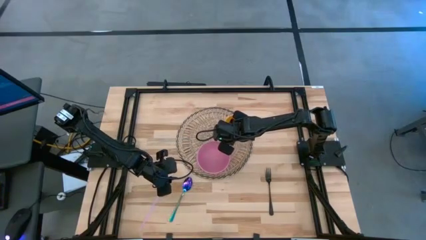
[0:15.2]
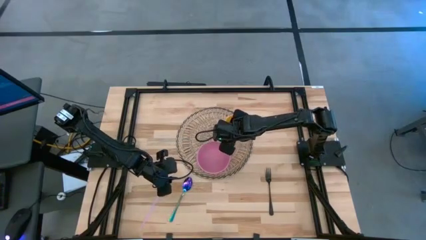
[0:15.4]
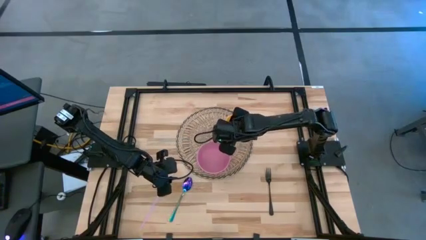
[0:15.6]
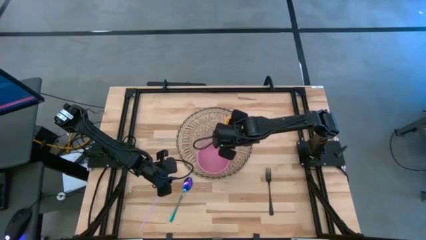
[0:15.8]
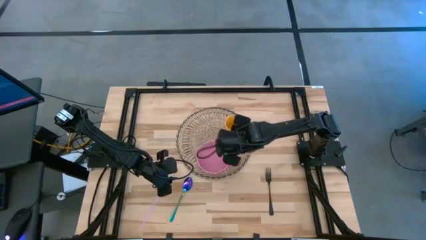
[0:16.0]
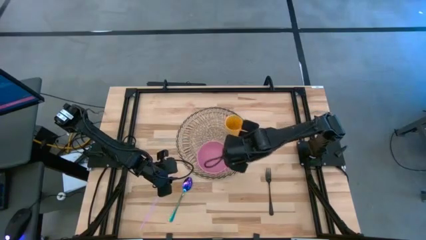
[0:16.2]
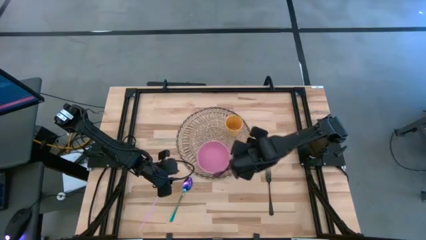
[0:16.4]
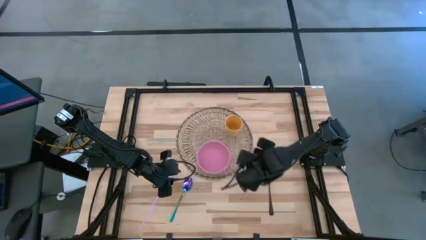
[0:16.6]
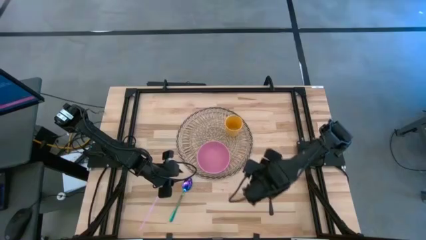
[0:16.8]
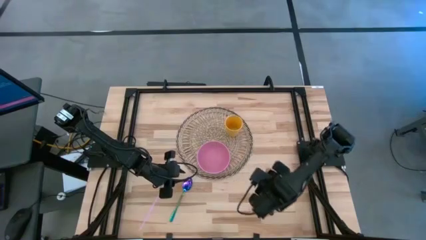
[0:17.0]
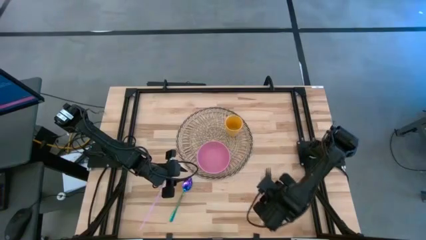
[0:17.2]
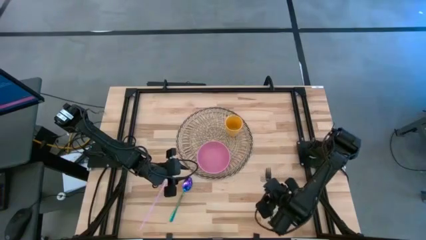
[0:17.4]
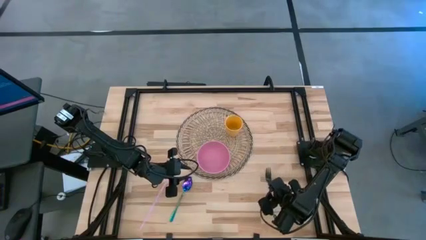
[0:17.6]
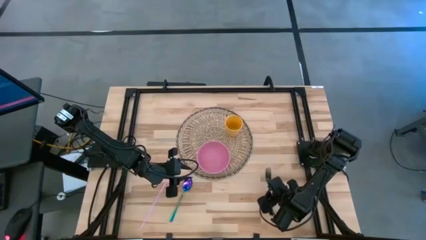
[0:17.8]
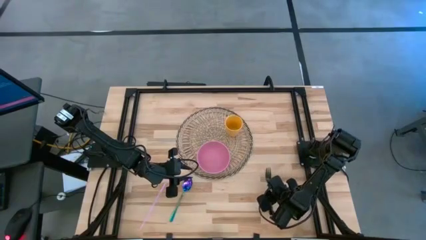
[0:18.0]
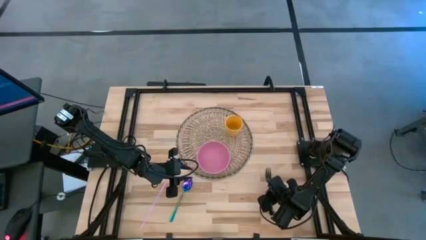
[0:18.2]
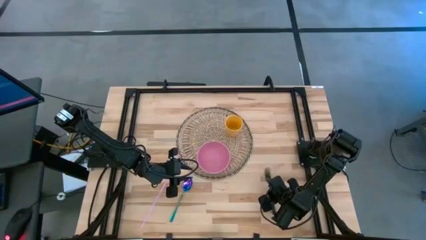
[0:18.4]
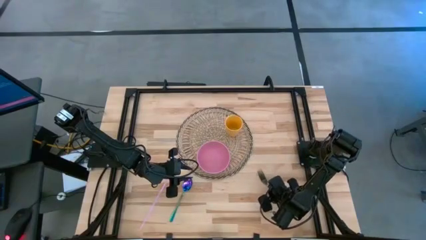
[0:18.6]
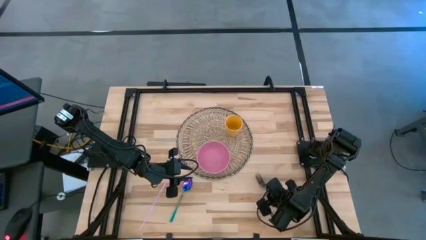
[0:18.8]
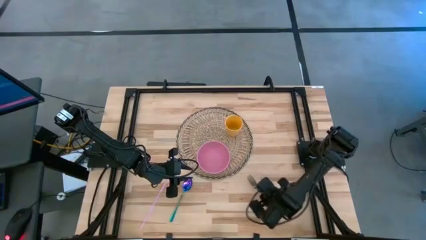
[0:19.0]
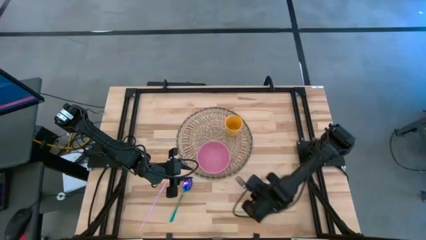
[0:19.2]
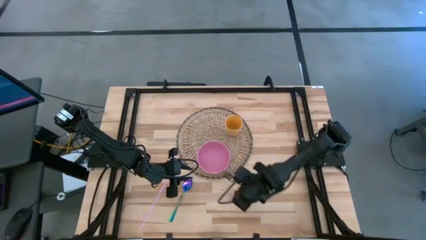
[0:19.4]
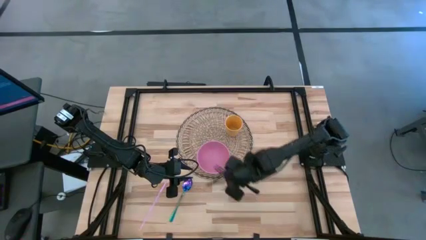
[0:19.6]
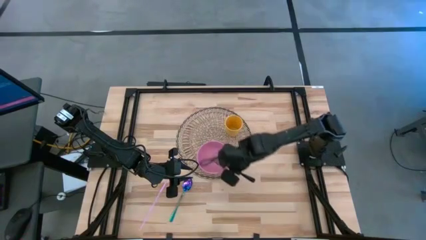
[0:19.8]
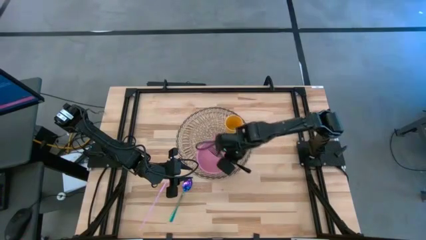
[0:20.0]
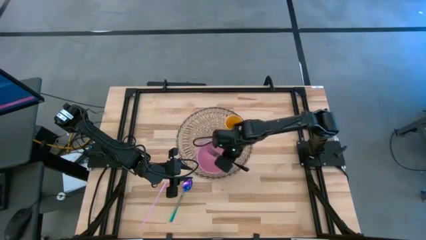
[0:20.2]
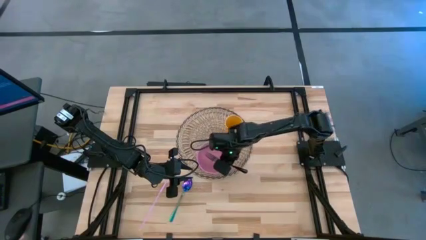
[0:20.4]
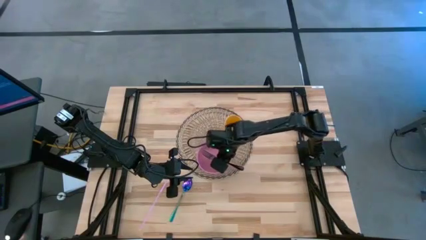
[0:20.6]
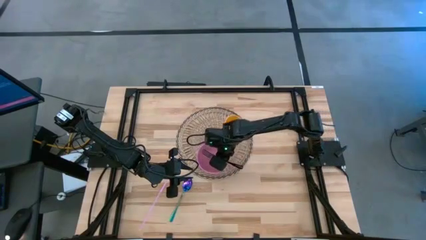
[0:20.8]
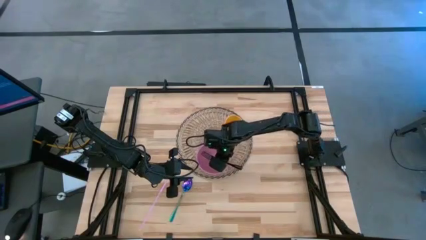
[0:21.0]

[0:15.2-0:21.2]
Task: Pick & Place Utensil
Put the fork in the pink bowl

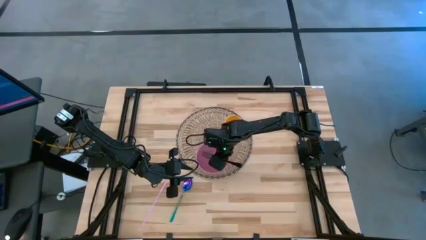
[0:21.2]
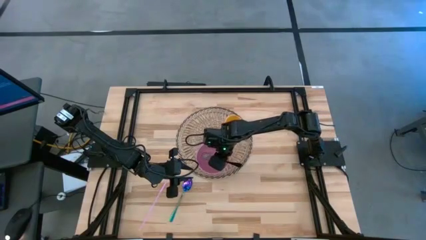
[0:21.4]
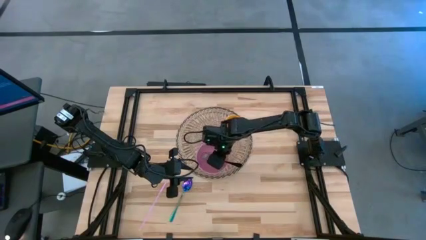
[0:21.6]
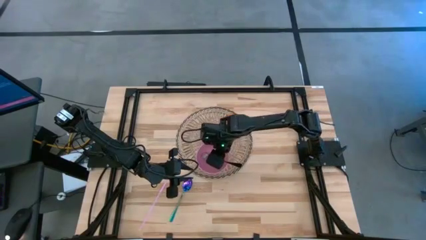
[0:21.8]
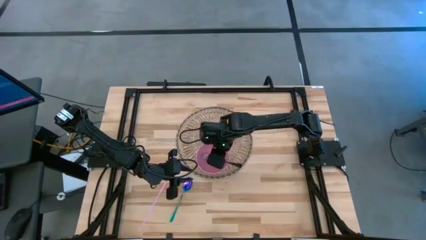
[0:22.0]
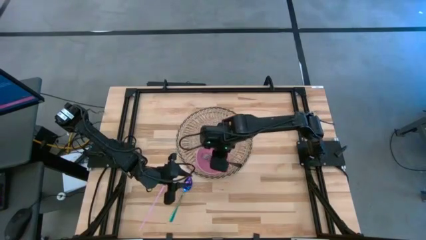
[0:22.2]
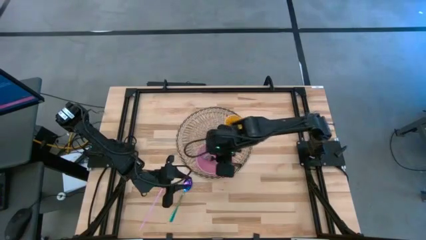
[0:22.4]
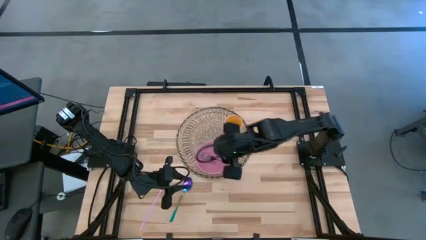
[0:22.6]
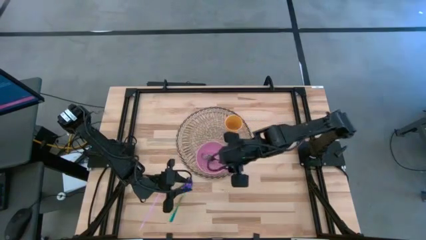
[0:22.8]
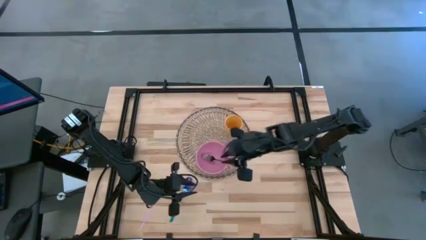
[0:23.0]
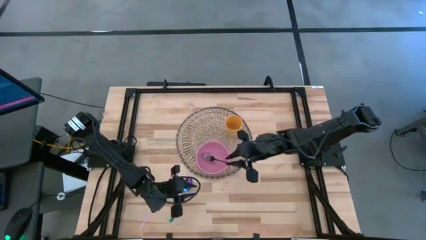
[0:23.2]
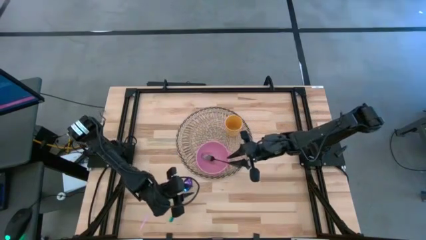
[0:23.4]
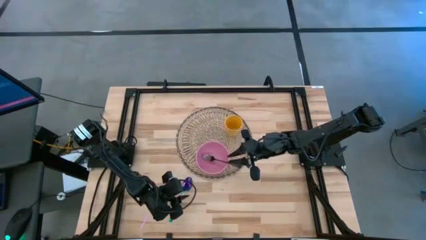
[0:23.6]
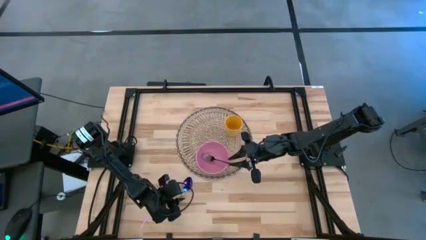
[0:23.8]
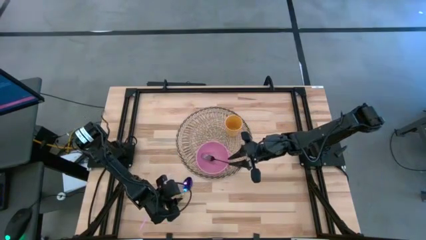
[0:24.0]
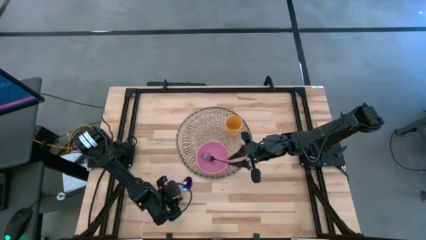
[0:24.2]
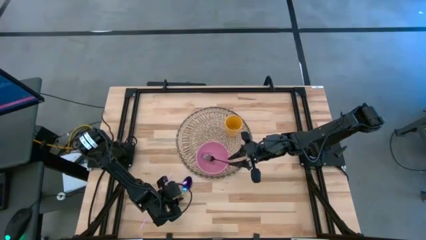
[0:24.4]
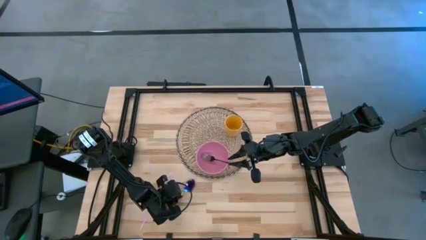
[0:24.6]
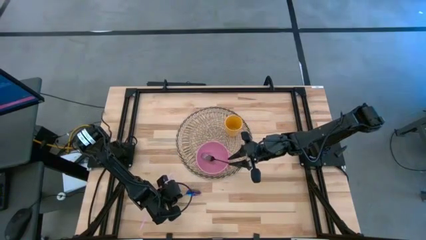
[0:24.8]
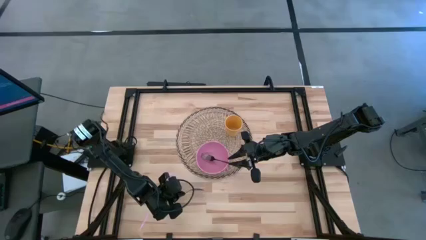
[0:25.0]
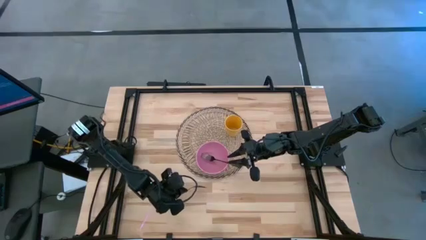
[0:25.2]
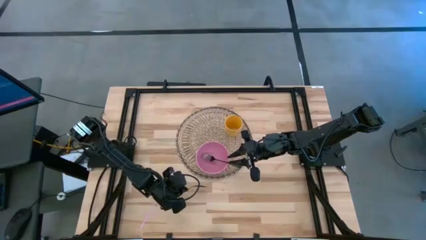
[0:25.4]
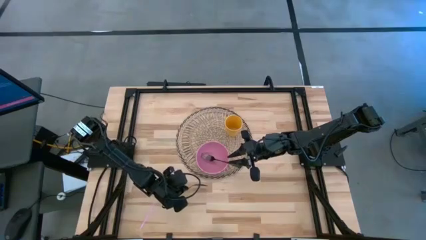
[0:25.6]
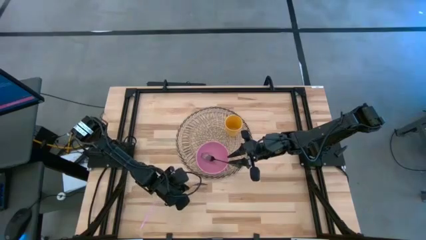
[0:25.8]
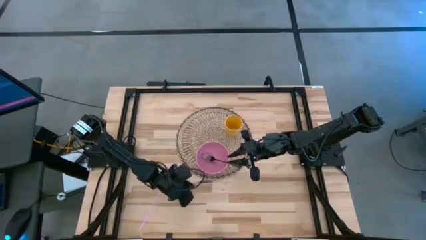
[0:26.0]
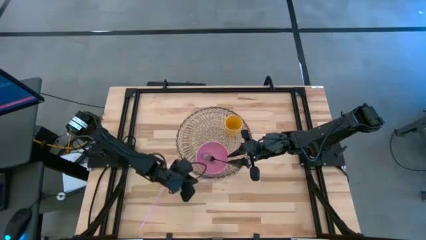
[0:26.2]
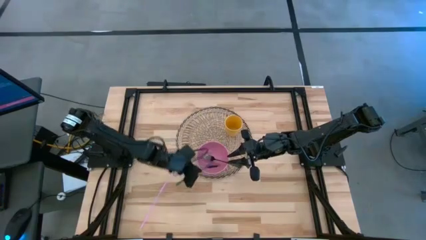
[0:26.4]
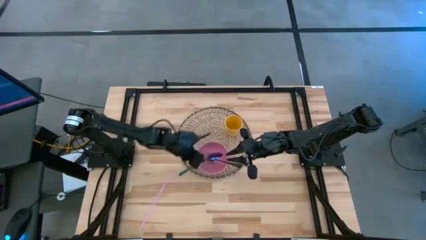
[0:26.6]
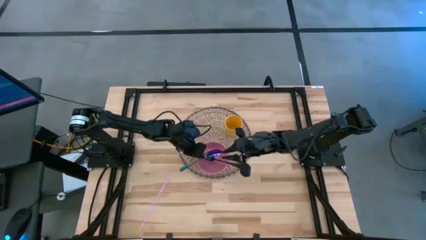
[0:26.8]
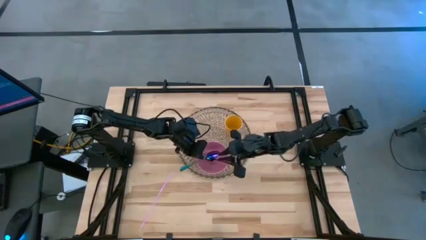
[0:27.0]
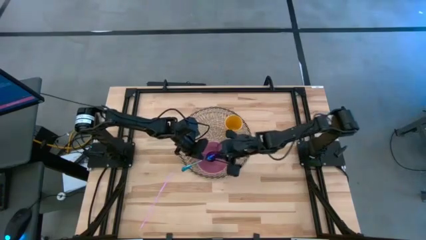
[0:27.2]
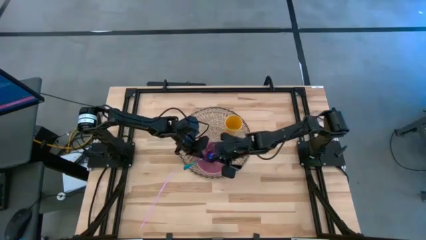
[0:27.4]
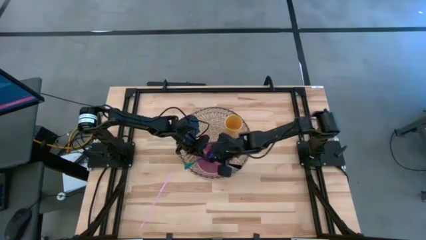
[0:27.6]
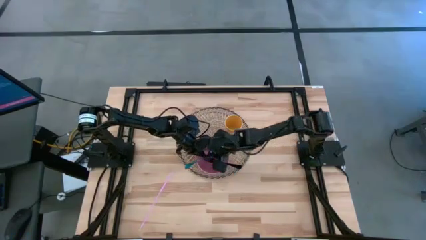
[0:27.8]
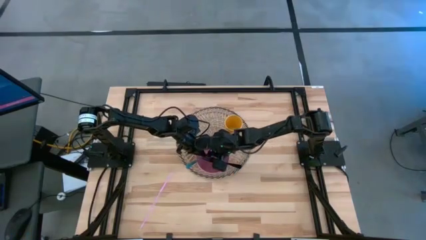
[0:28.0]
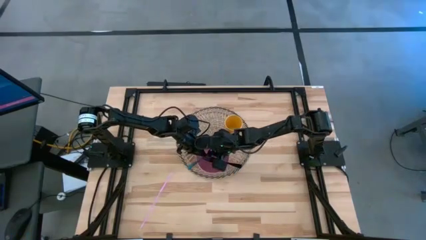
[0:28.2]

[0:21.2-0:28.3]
Put the spoon in the pink bowl

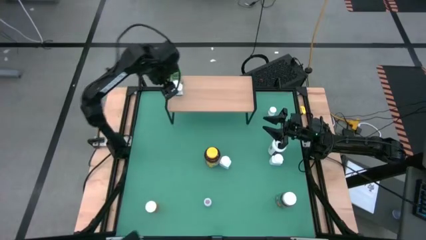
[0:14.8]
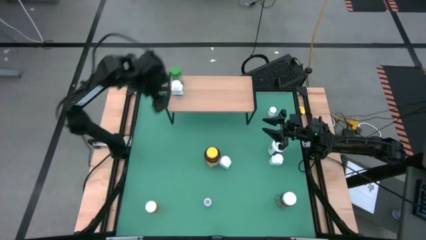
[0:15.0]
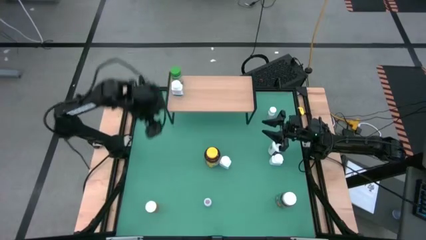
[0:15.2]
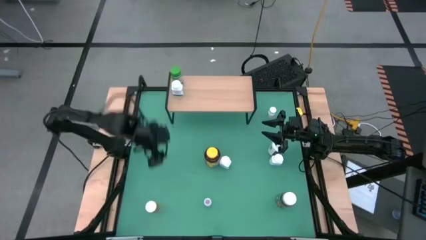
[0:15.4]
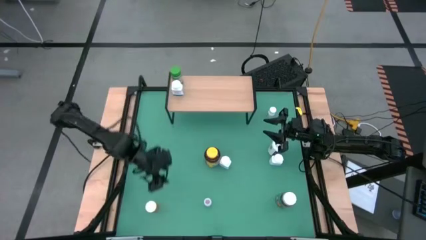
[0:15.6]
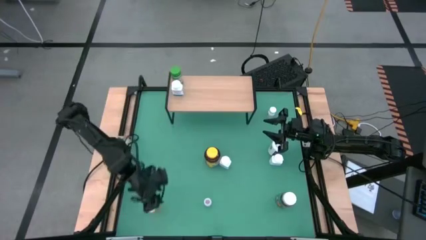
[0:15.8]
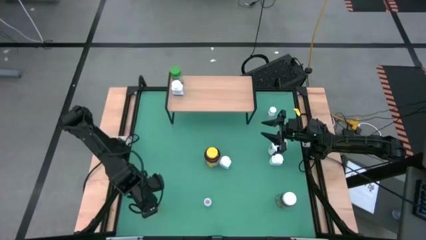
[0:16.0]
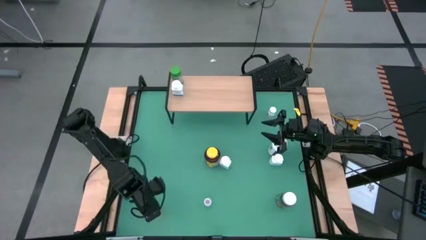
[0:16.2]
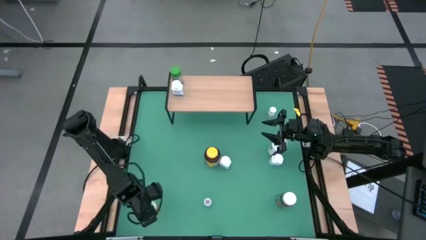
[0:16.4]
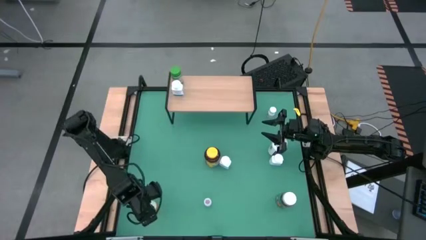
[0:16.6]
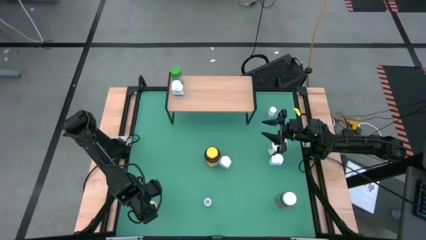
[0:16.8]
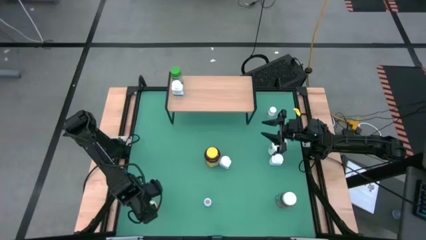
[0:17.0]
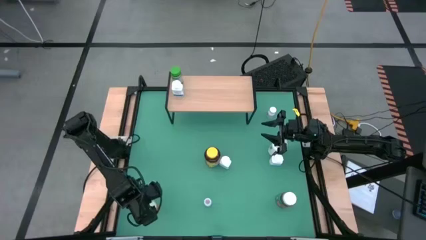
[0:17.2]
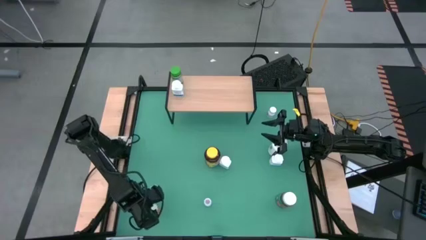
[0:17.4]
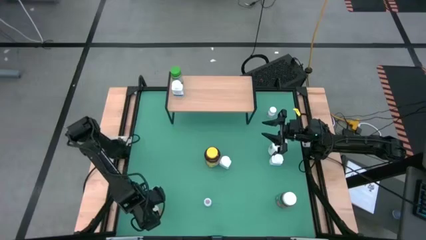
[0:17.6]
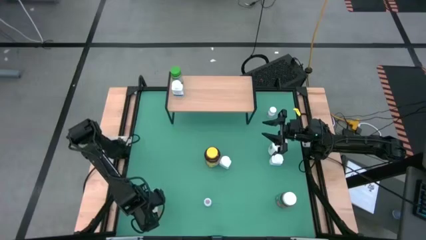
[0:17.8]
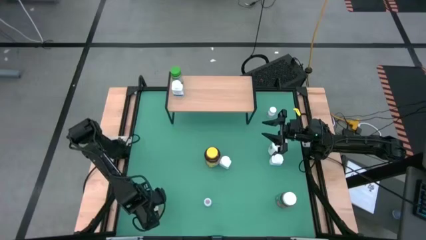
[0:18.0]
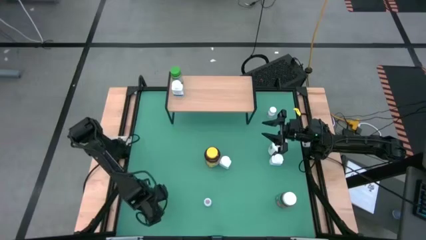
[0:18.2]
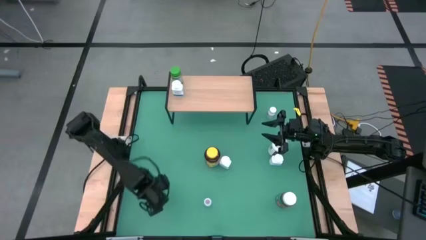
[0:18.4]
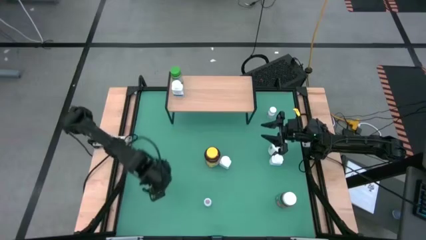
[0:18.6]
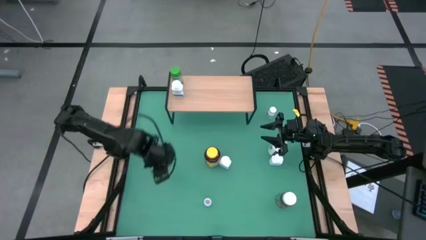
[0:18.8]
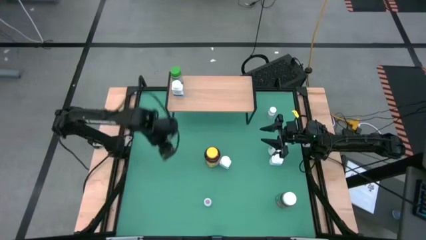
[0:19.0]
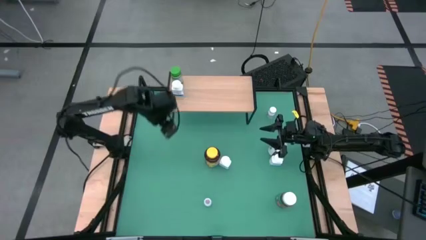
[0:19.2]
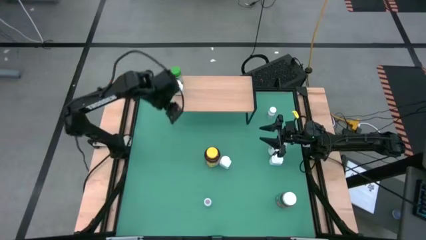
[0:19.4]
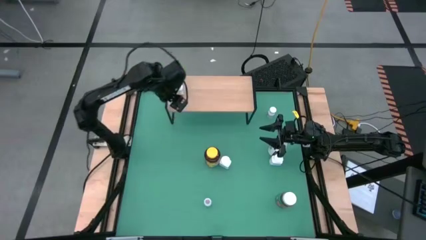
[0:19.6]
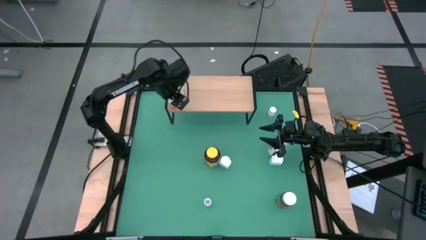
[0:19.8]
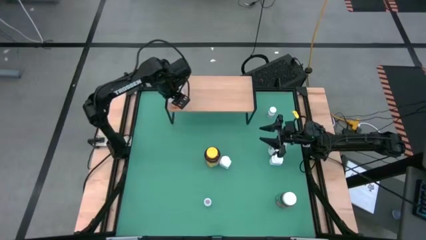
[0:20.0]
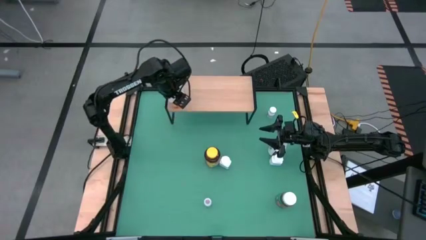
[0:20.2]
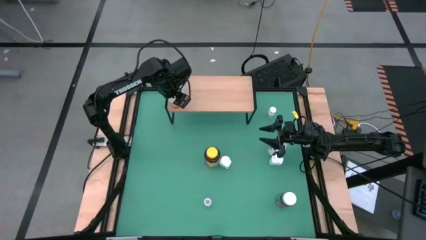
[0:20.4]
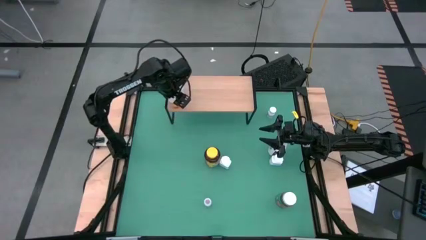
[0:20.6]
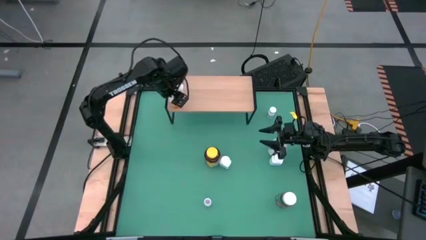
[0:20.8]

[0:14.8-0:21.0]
Task: Pick and place medicine bottles onto shelf by color
Put the orange pill bottle on the shelf
